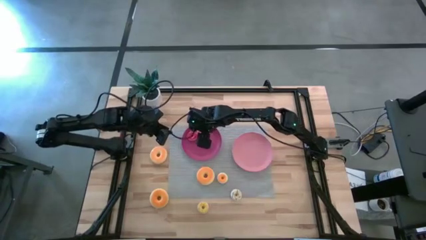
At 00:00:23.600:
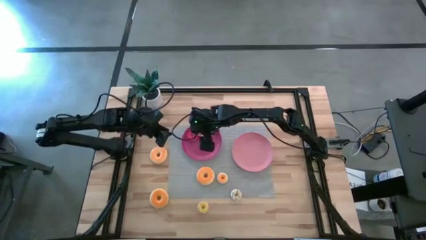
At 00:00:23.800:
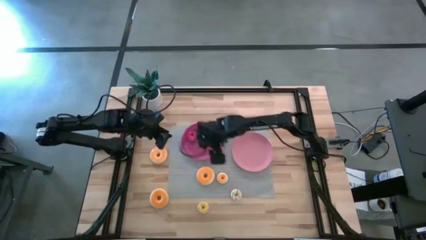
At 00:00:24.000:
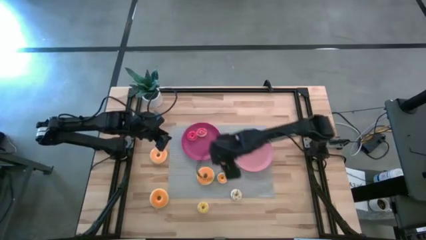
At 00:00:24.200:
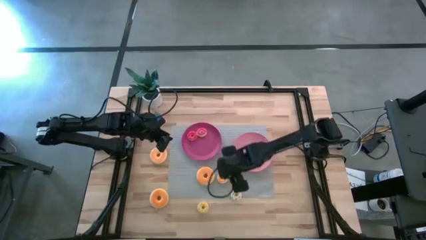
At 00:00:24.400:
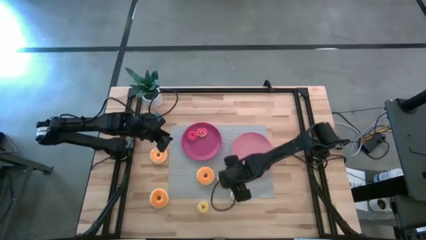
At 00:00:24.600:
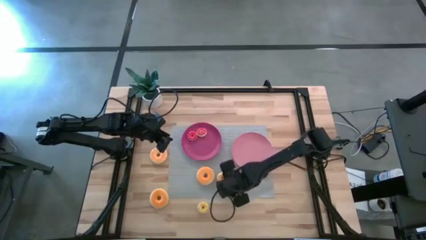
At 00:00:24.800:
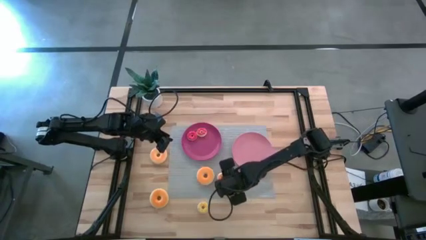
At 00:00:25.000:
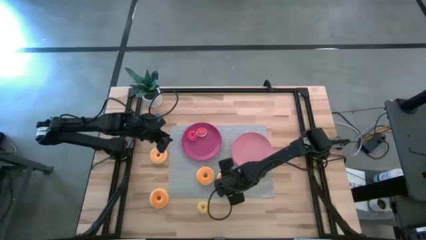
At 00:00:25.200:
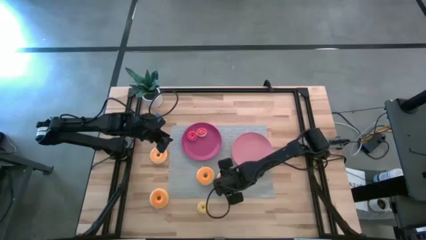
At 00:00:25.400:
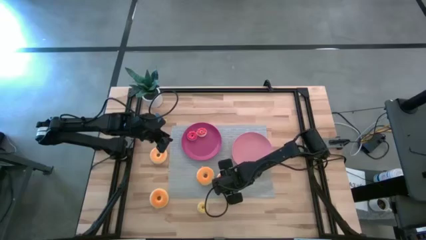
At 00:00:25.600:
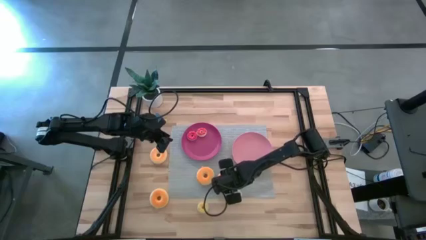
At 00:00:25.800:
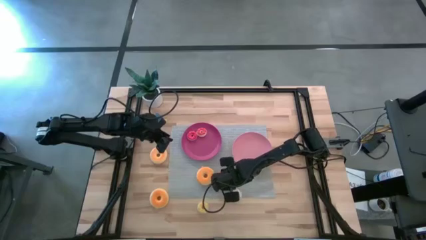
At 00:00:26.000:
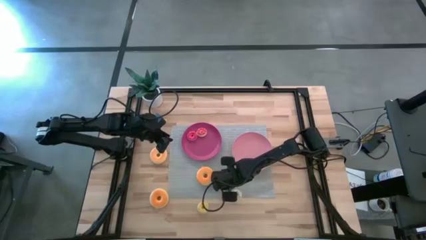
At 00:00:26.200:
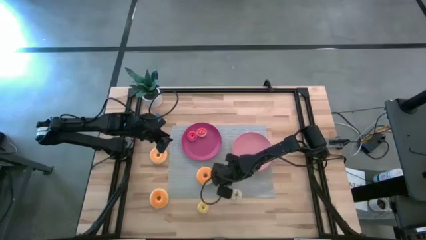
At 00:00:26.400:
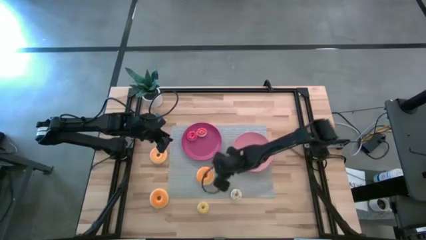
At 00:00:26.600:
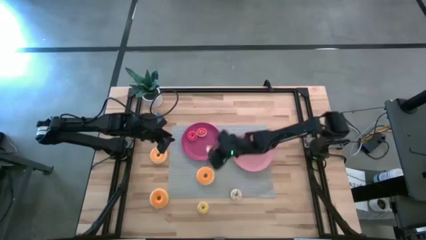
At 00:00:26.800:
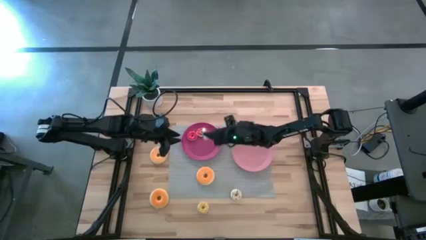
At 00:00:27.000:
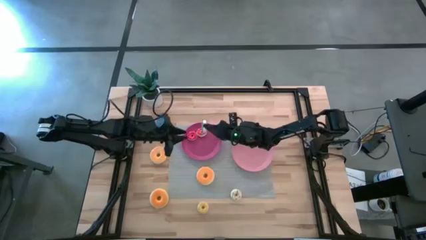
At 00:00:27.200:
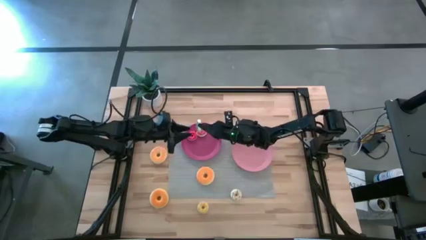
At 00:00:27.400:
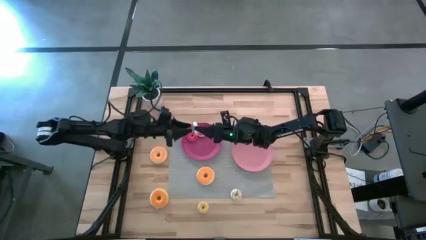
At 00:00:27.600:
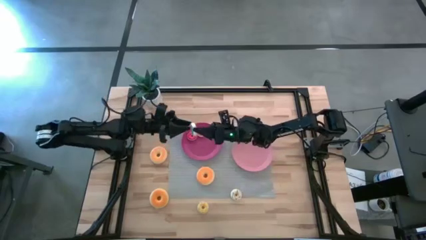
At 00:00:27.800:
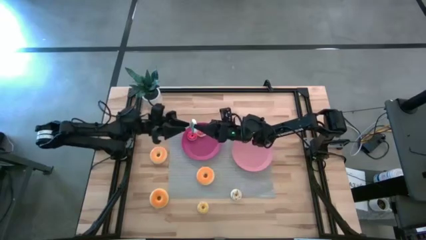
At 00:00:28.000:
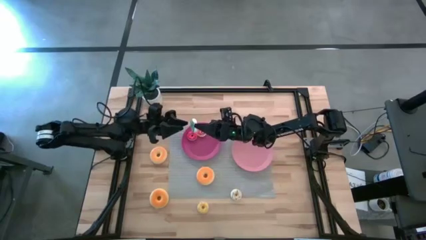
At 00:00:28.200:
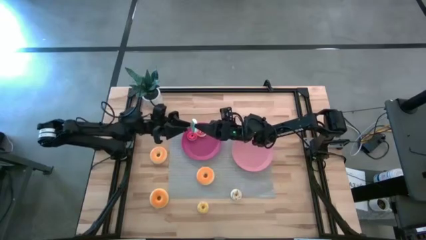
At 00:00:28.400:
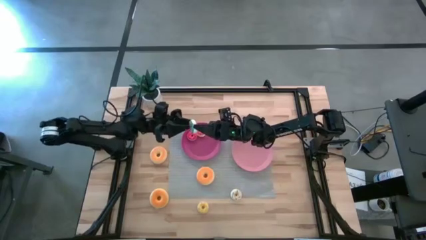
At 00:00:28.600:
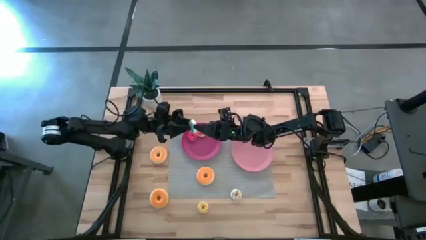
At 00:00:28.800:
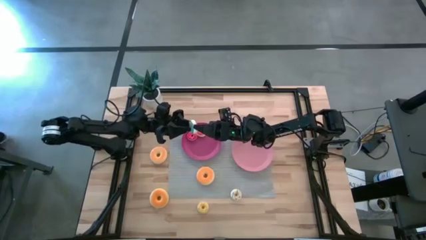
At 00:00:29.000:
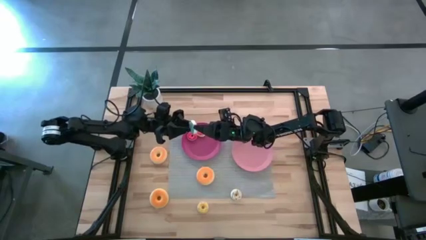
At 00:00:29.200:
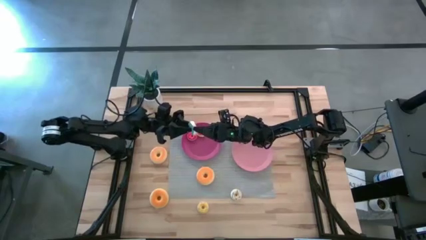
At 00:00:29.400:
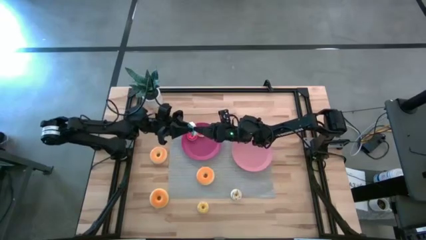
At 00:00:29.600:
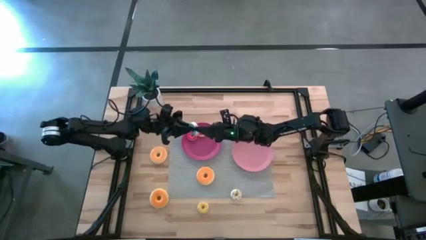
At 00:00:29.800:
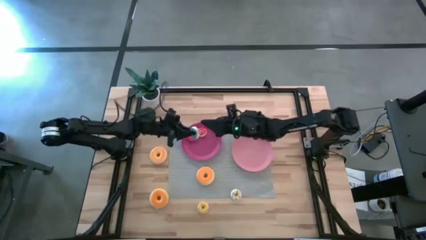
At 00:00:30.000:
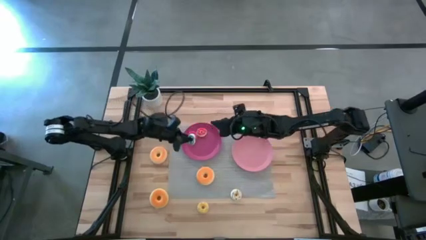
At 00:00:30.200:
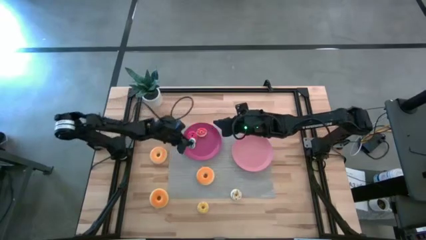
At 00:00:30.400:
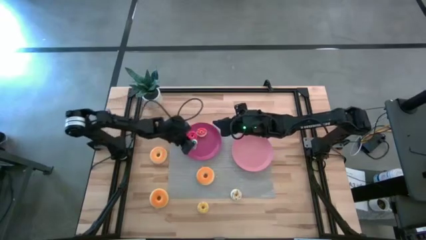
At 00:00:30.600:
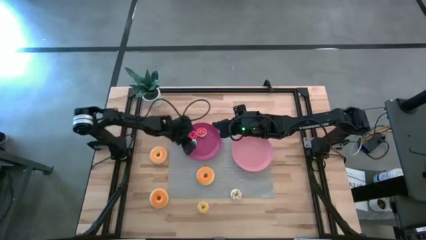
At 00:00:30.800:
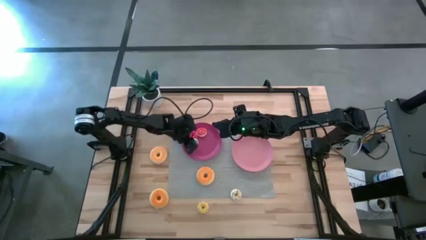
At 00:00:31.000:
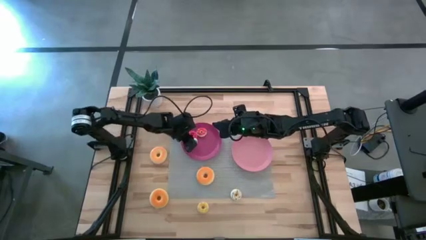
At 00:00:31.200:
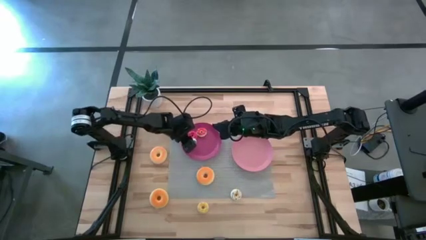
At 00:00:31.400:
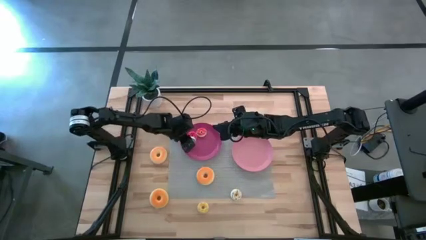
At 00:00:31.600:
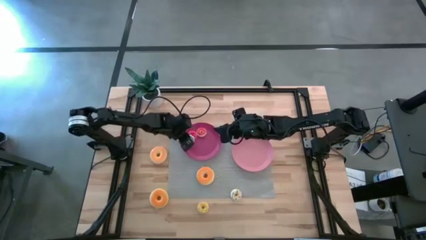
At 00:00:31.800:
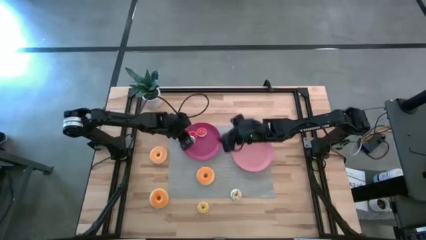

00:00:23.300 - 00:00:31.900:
Task: Pick & Place donuts
Put the small blue donut on the pink plate

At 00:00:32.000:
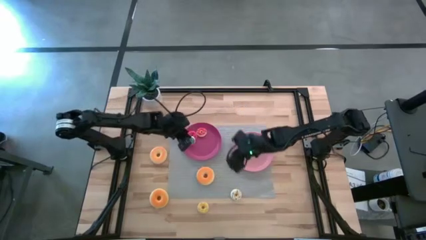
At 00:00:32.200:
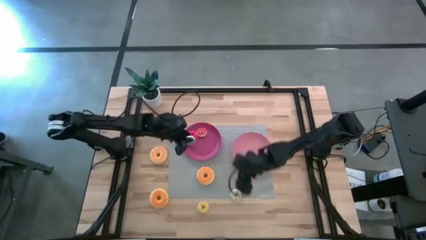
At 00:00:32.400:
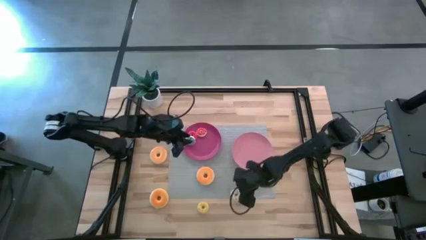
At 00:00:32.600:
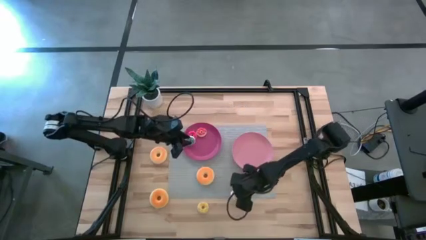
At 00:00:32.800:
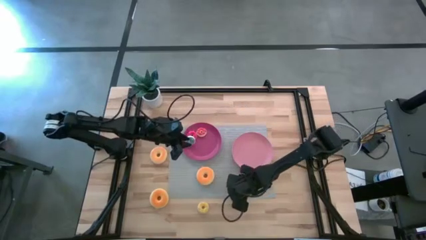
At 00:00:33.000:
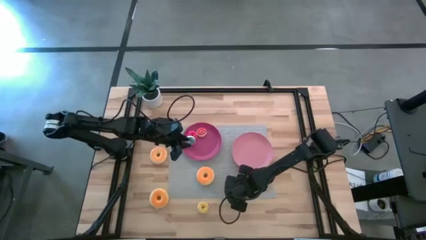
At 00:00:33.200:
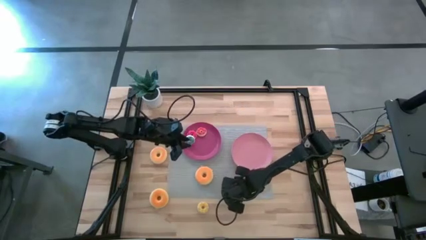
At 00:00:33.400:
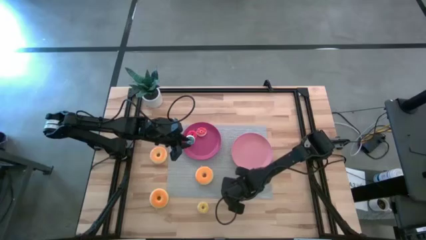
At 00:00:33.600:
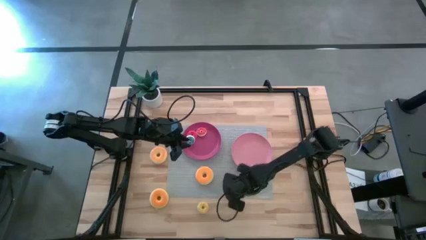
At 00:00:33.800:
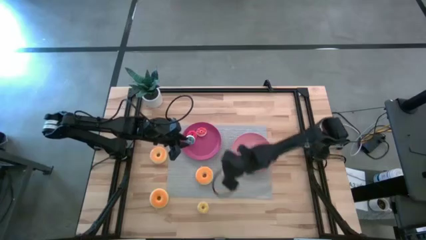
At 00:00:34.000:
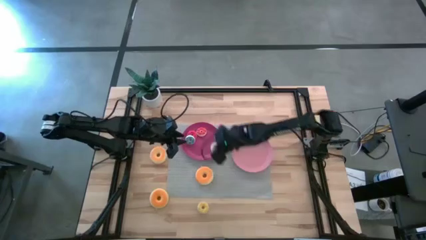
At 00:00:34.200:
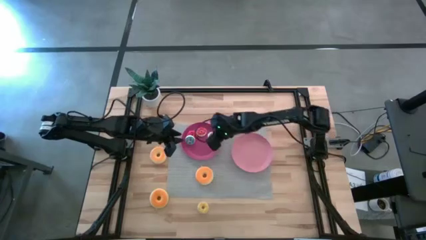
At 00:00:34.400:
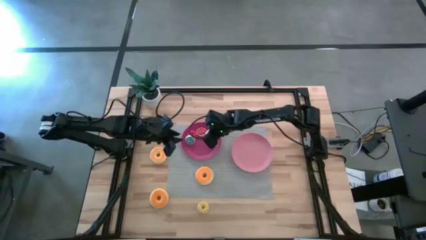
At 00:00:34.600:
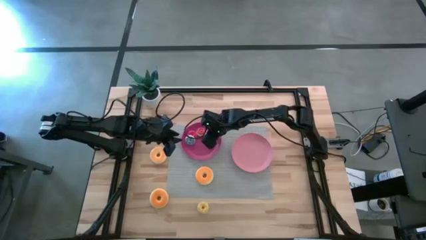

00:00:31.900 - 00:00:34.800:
Put the small white donut on the pink plate

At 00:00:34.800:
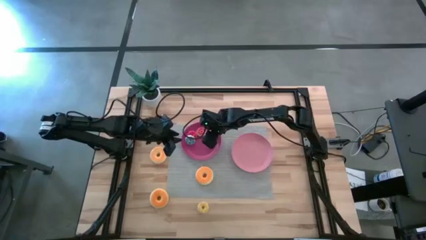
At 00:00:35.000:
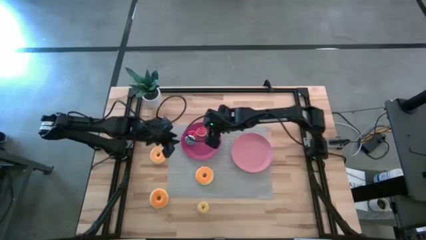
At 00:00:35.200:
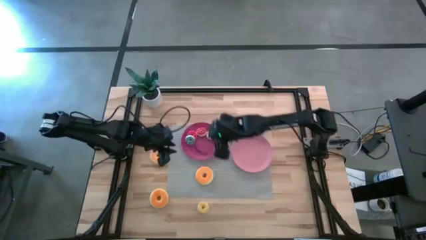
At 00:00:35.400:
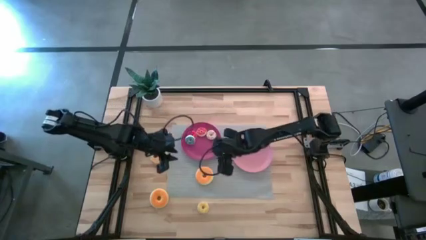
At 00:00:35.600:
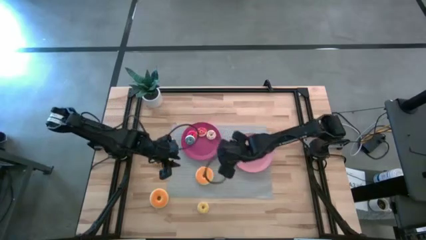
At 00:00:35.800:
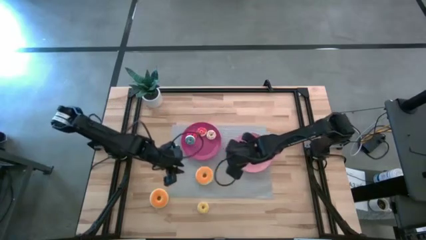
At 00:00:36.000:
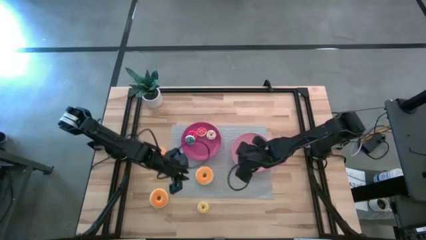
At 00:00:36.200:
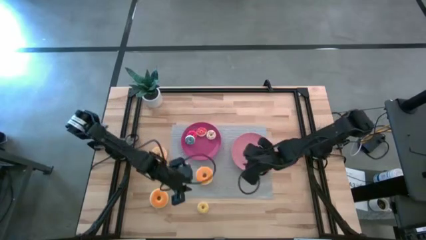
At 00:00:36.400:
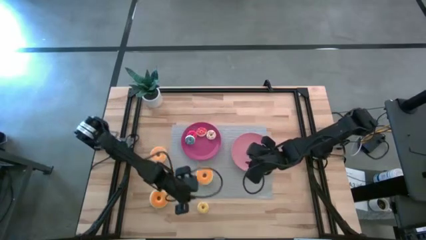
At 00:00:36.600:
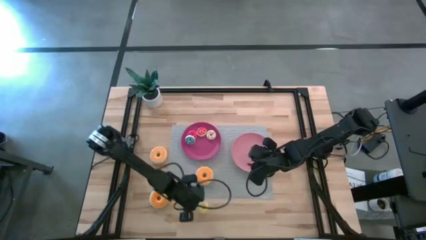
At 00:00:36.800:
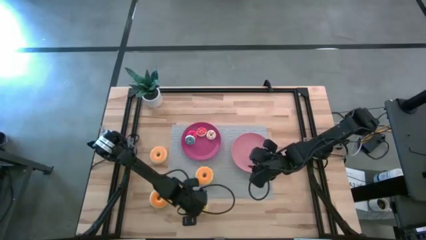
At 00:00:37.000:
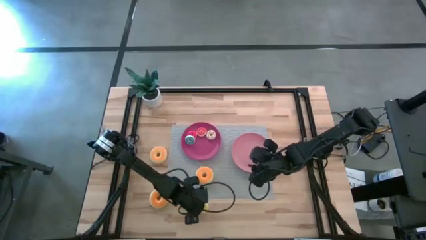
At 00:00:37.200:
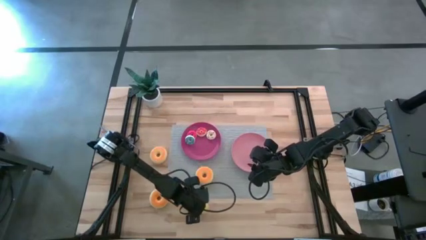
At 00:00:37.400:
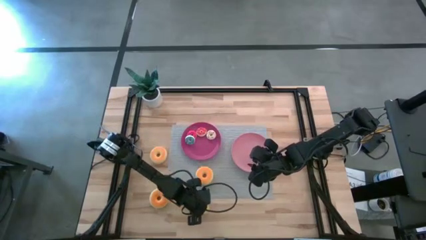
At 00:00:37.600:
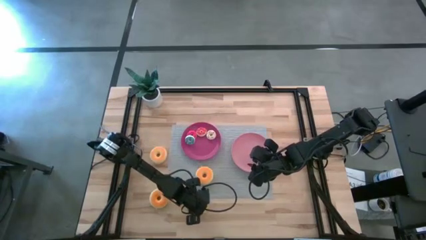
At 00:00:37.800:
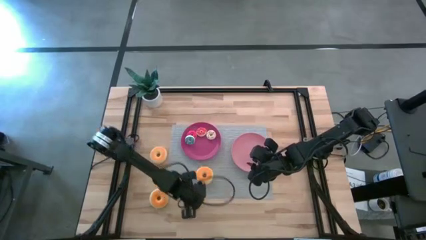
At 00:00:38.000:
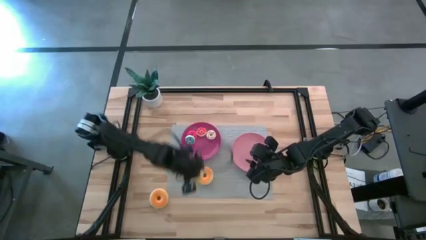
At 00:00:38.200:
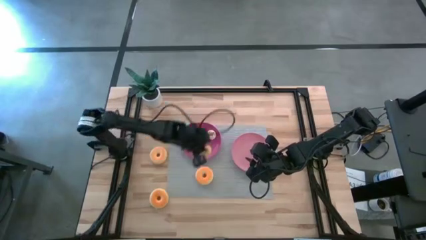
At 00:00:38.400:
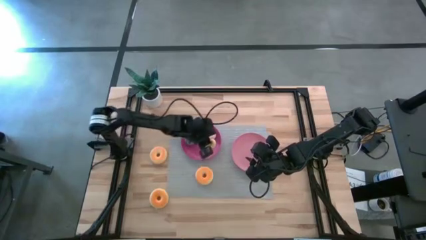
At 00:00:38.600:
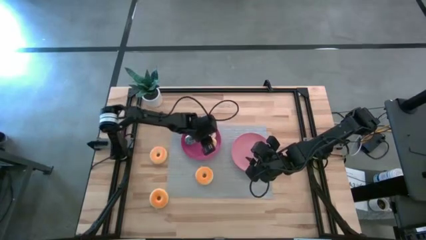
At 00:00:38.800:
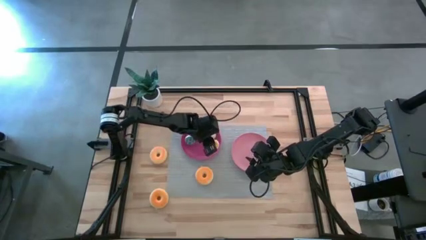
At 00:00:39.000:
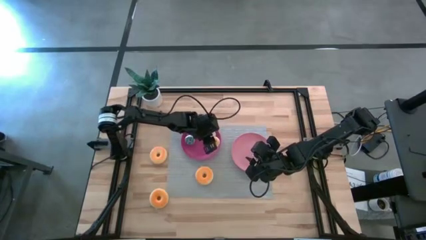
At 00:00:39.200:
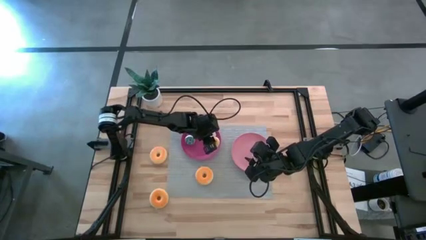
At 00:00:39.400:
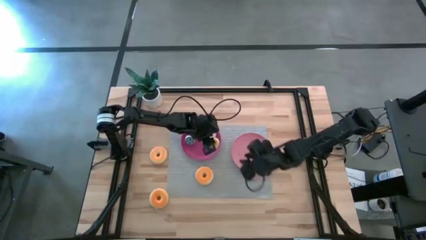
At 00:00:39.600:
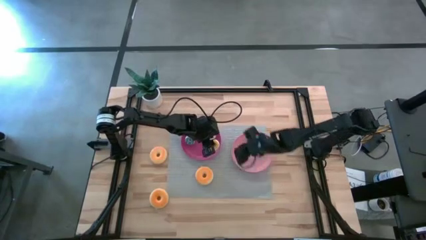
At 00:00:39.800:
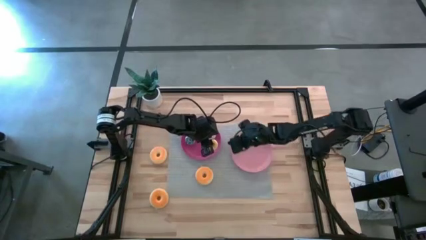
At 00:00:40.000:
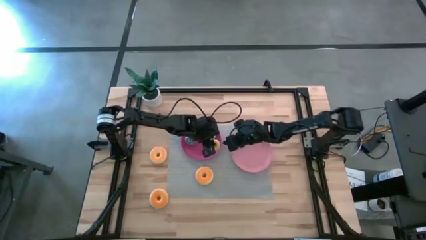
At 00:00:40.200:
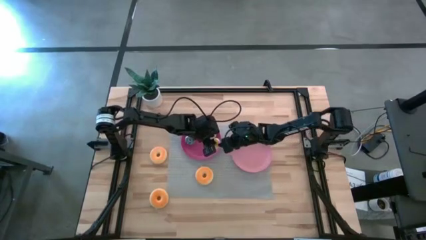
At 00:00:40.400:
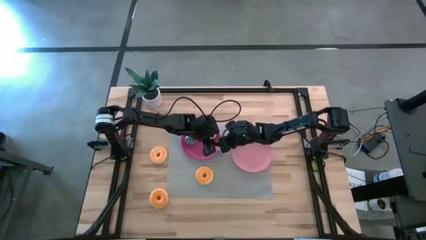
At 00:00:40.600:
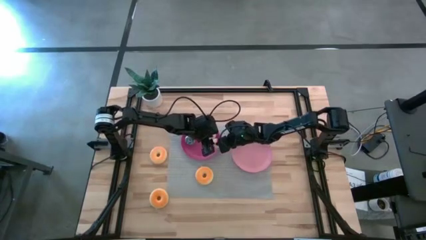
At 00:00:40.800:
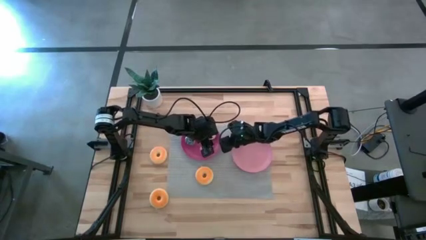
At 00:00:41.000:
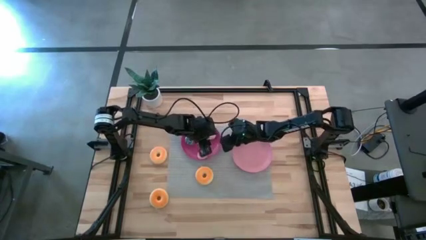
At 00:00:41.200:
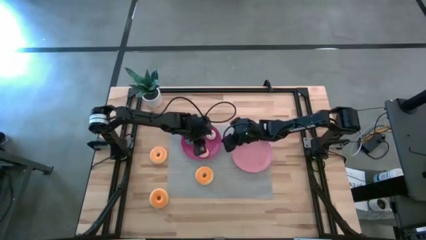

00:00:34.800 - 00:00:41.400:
Put the small yellow donut on the pink plate
